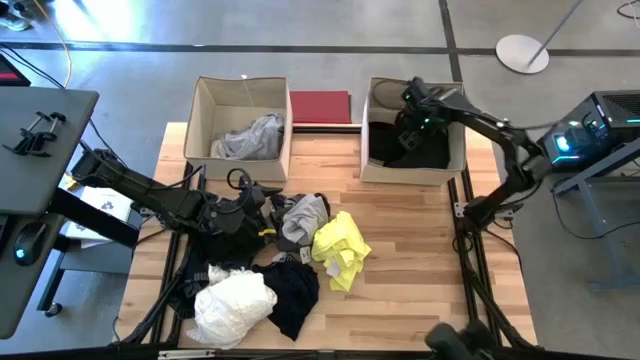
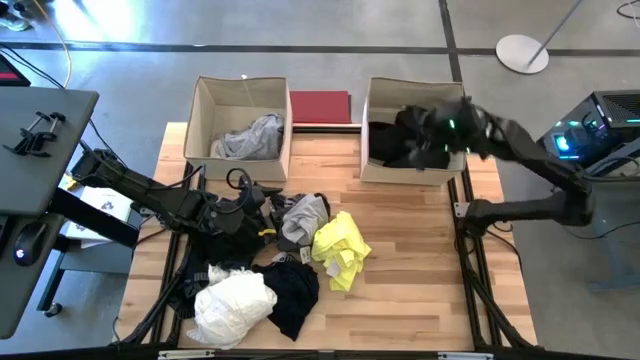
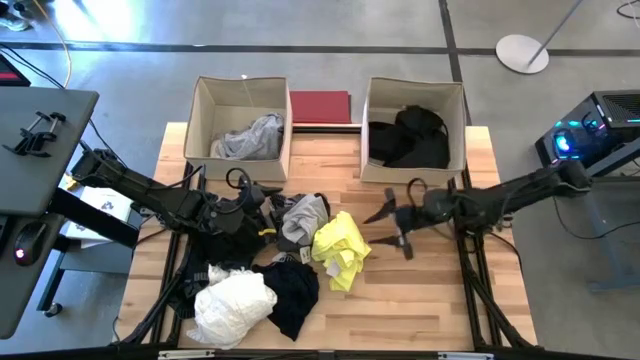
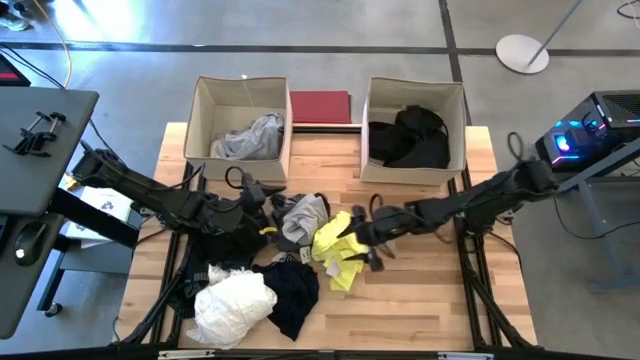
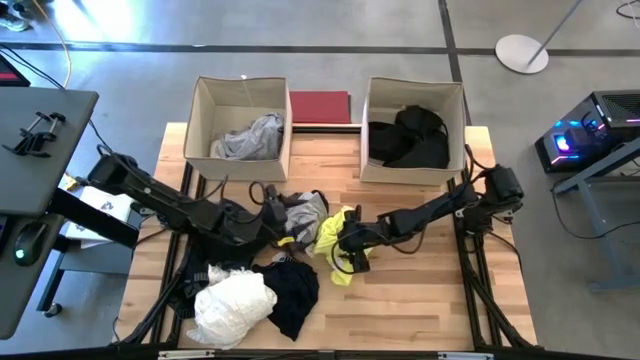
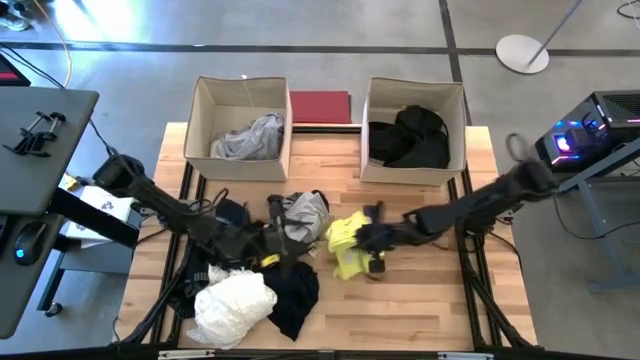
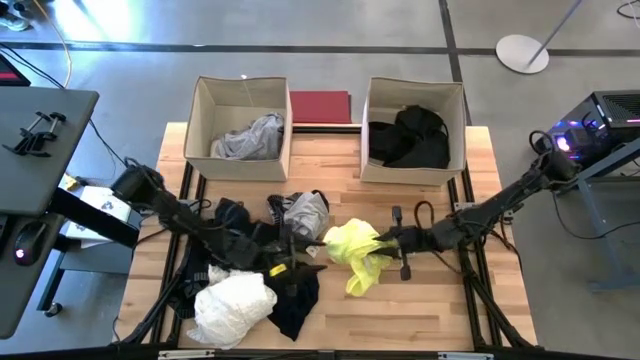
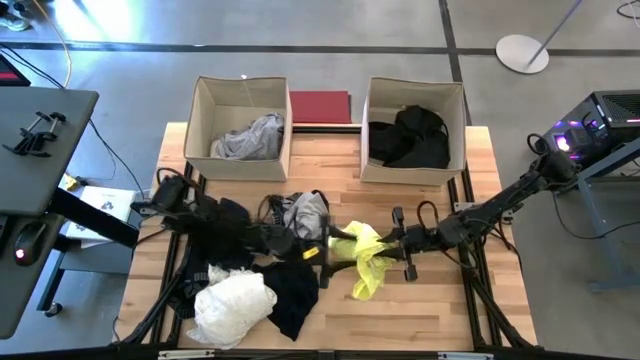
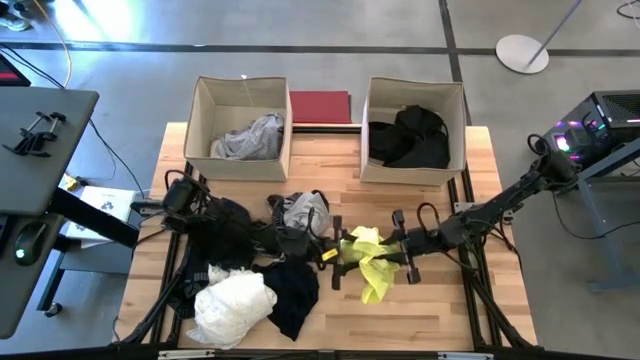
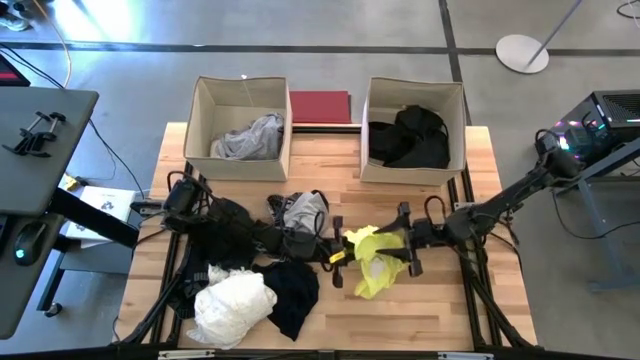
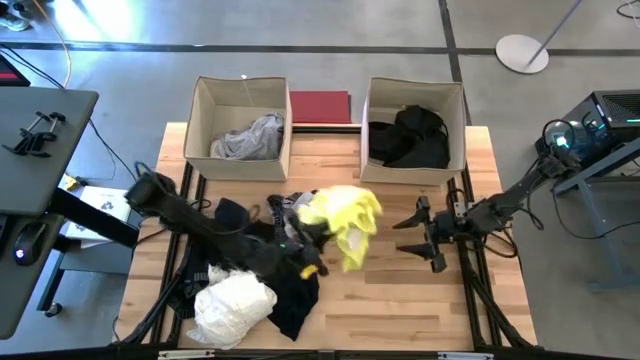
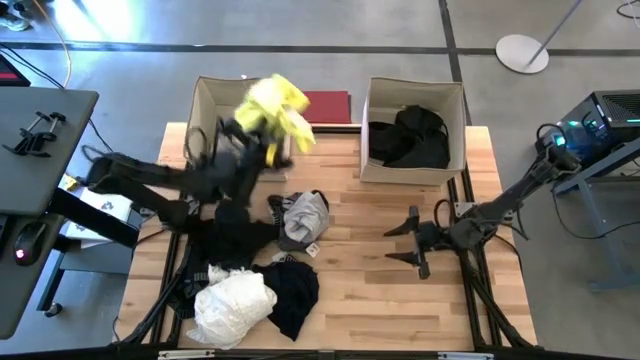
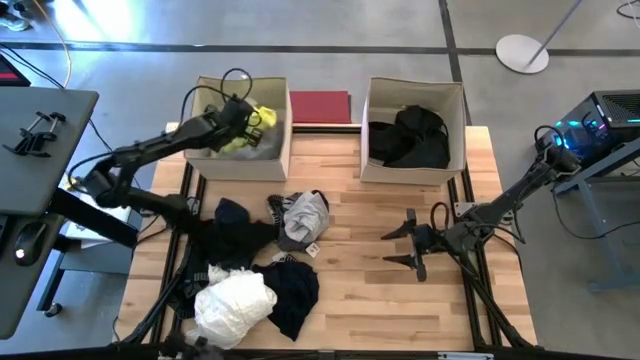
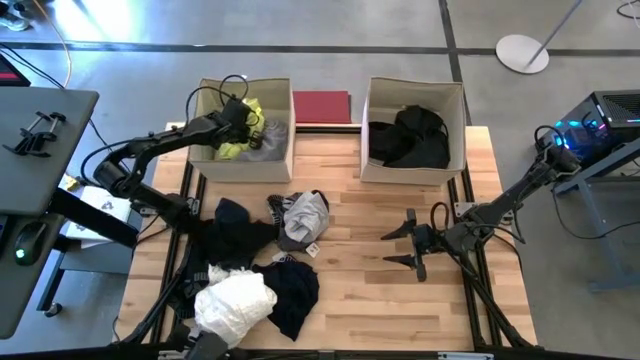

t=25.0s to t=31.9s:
Task: Sort clothes
Put the yellow shirt into the left brown laundry organizer

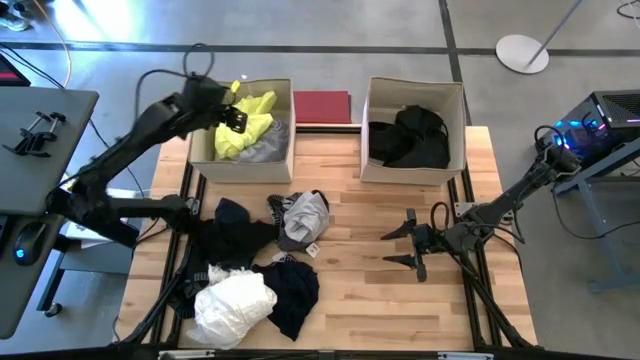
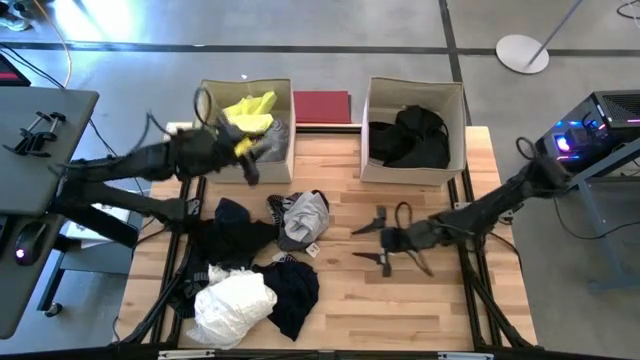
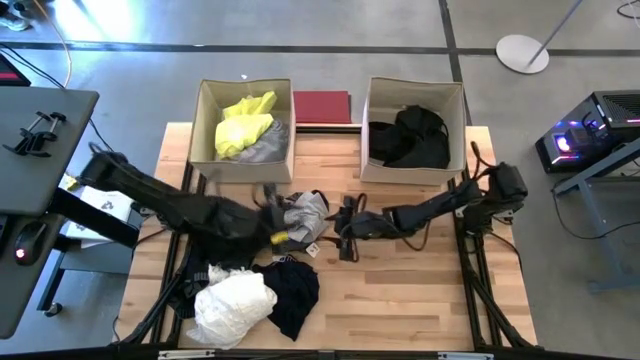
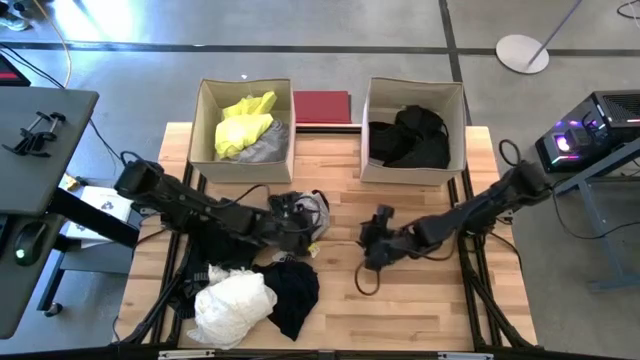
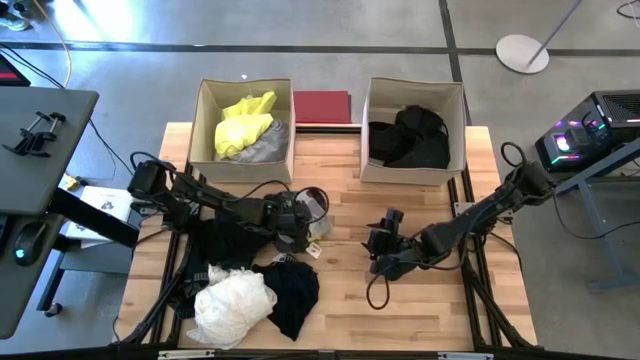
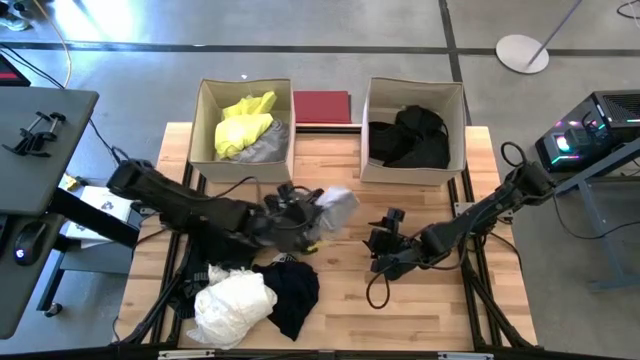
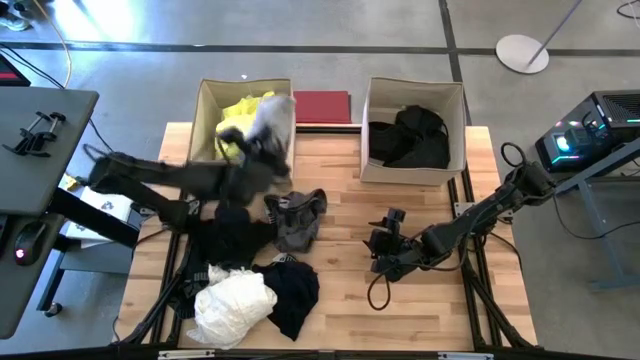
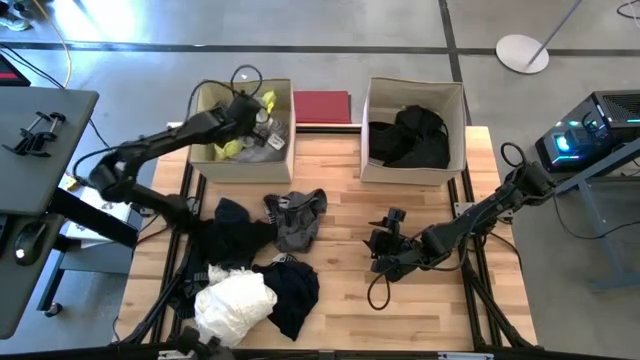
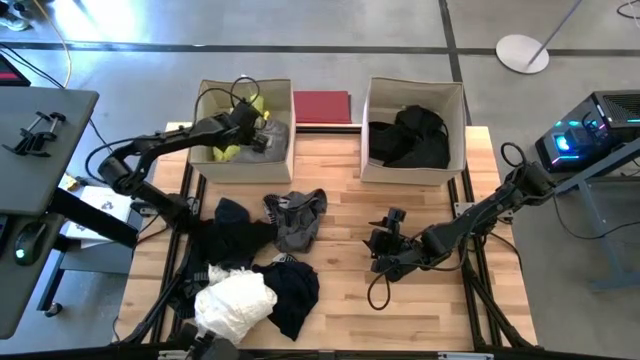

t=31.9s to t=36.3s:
Put the grey underwear into the left brown laundry organizer

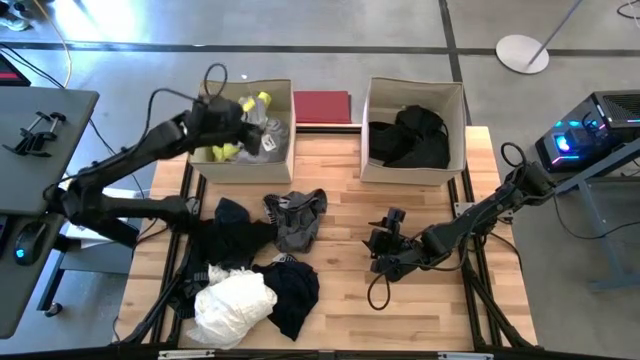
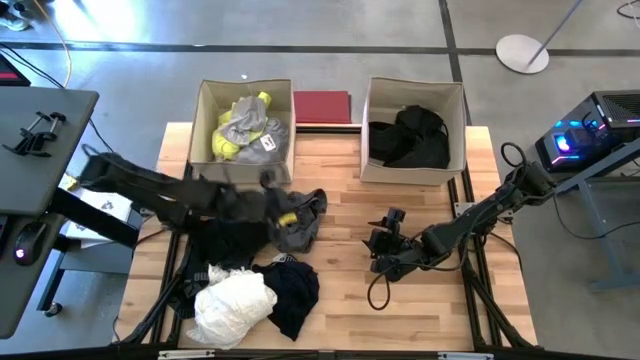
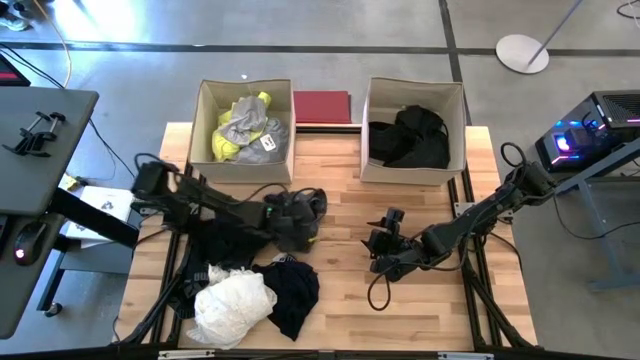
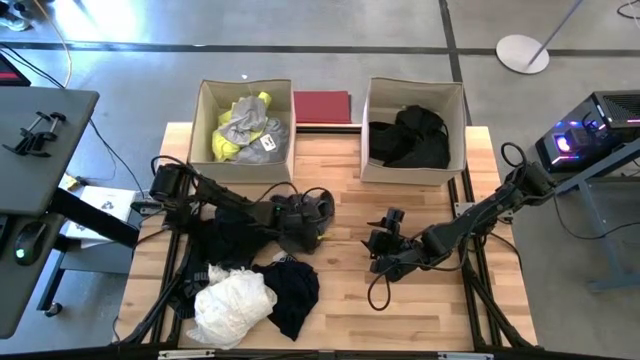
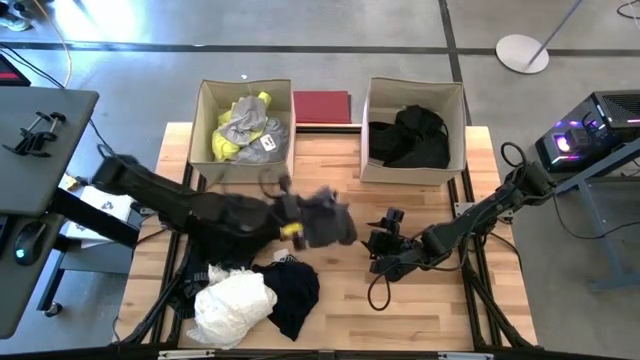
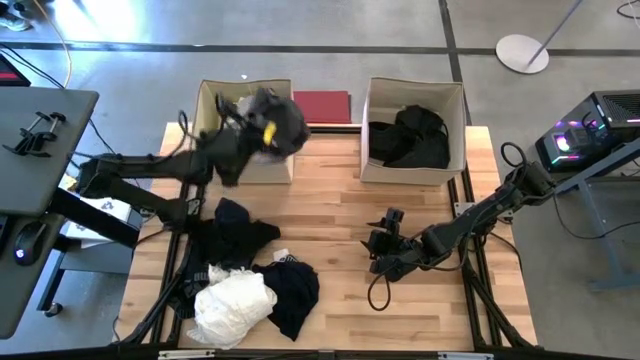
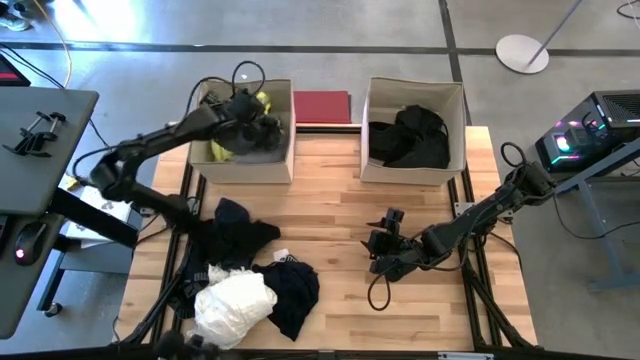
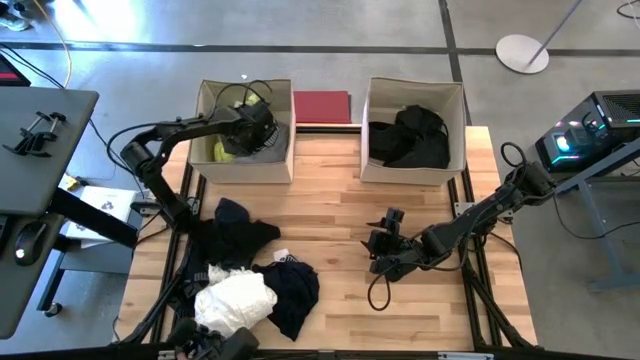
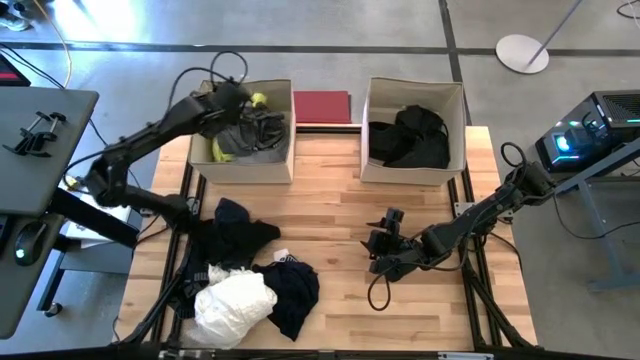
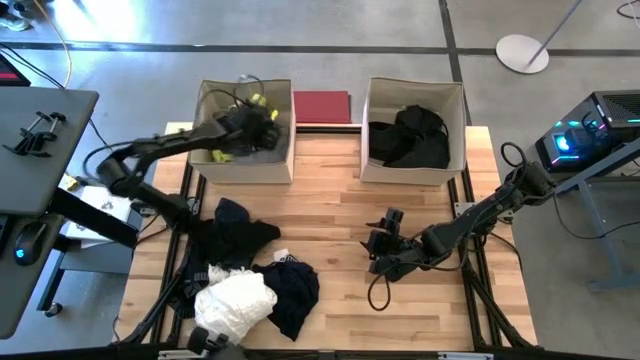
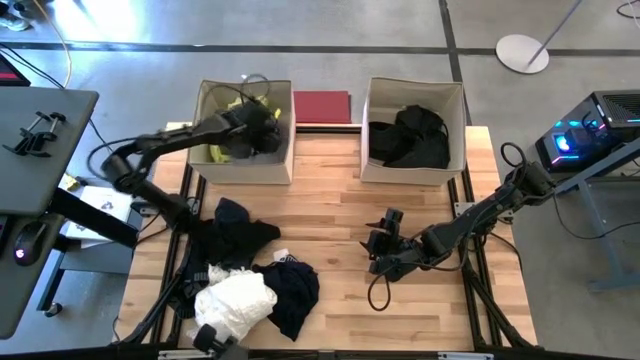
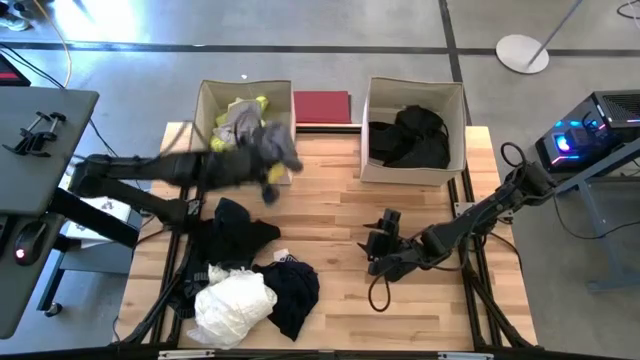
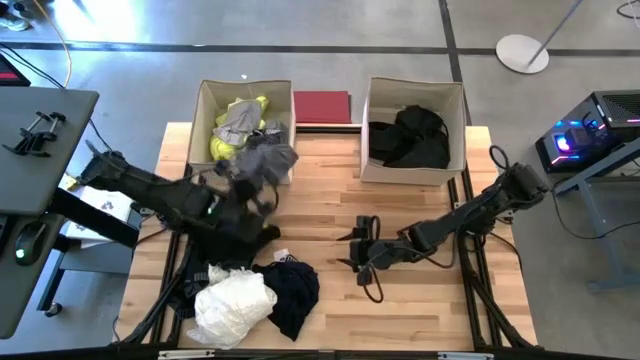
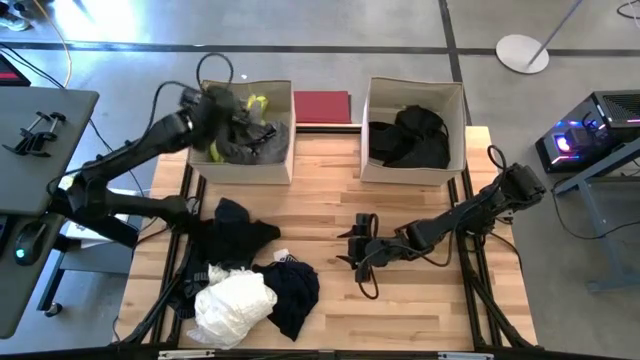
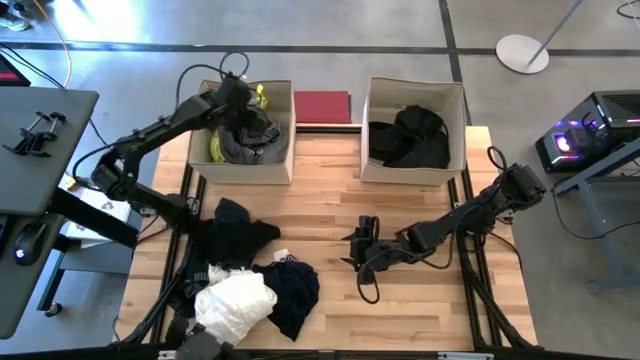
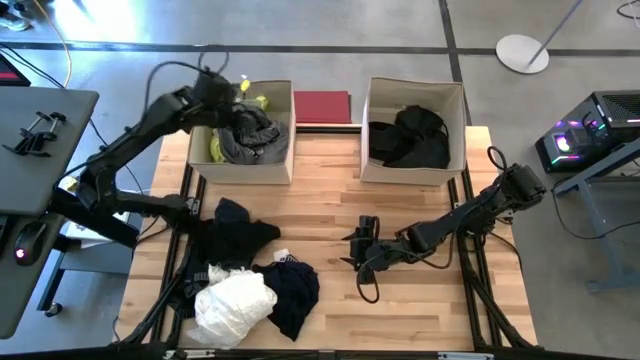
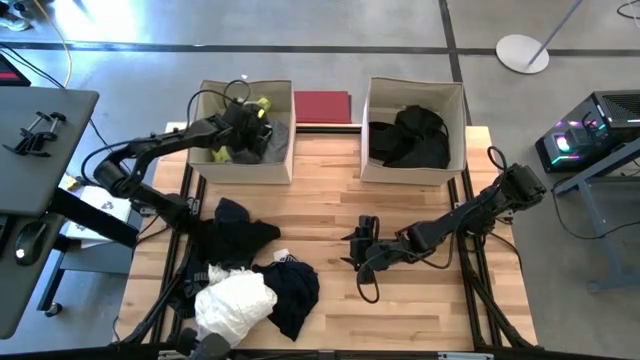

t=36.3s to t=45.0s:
Put the grey boxers into the left brown laundry organizer

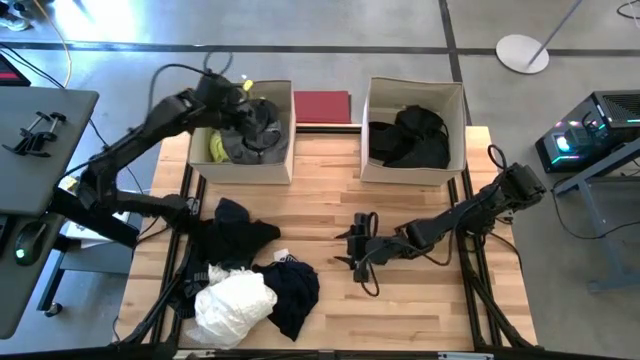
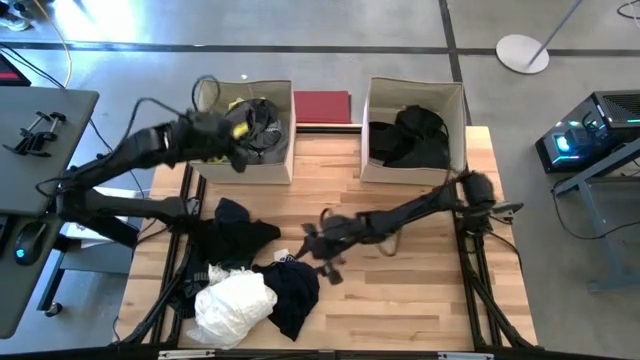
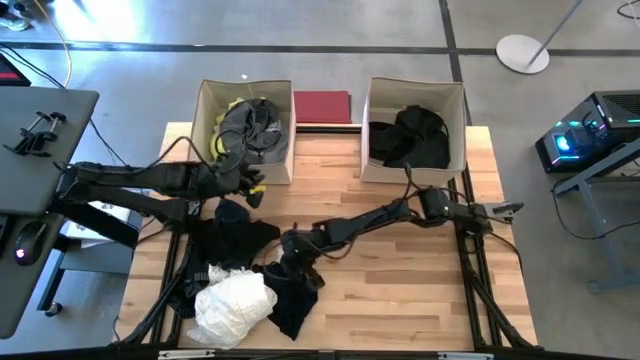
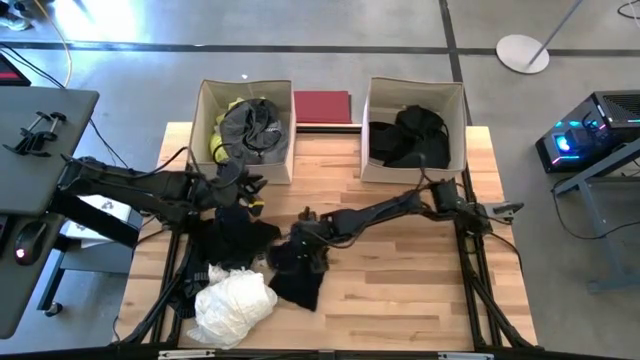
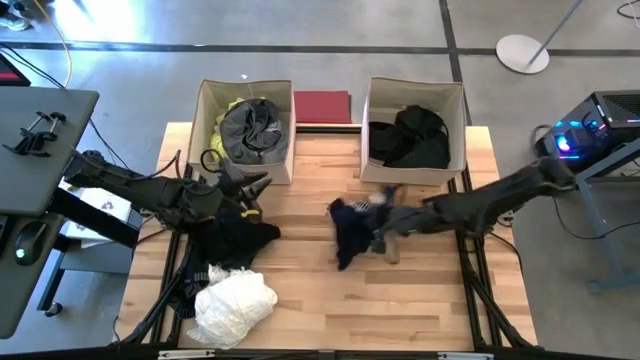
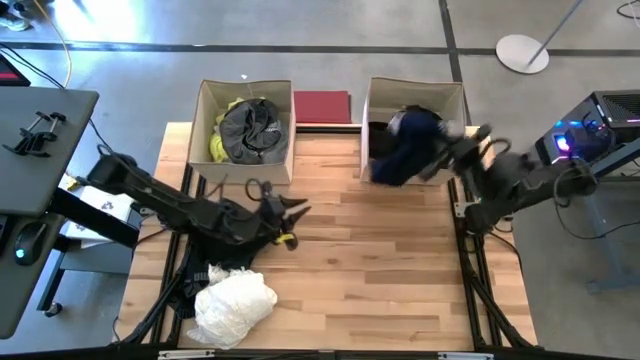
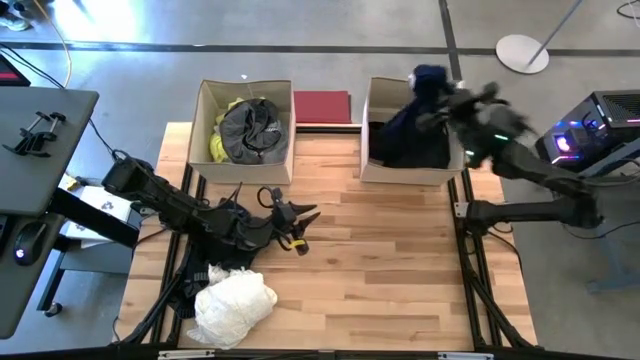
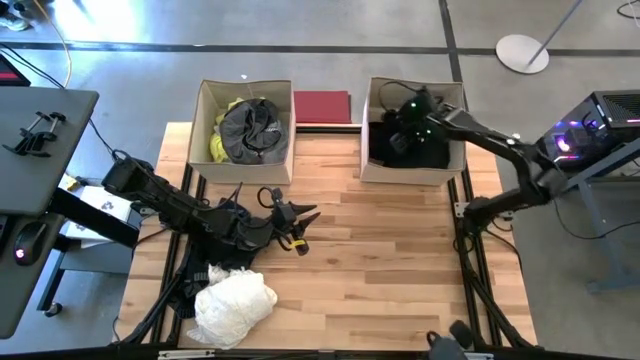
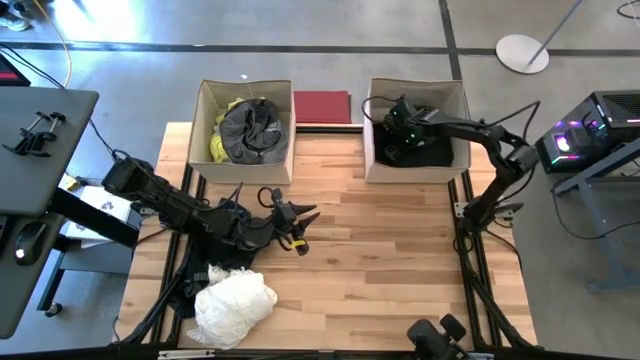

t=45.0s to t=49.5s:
Put the black boxers into the right brown laundry organizer
